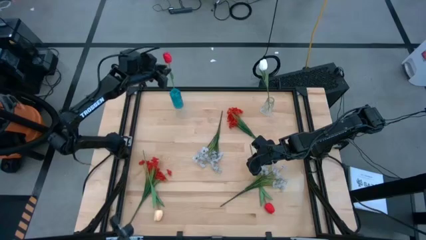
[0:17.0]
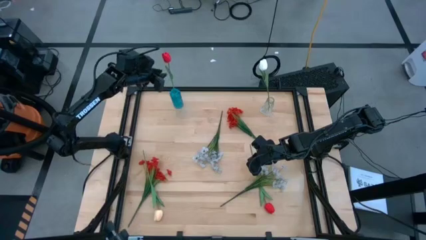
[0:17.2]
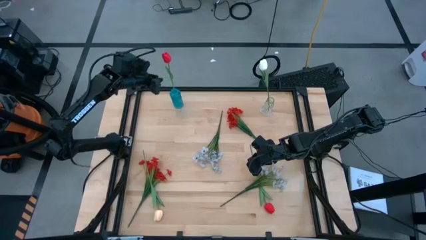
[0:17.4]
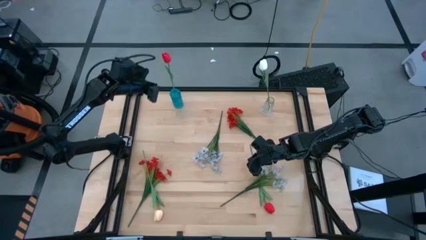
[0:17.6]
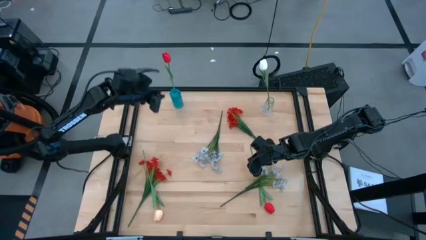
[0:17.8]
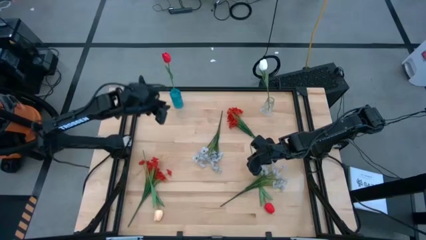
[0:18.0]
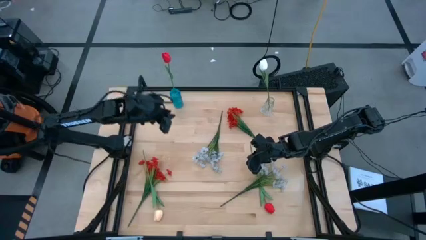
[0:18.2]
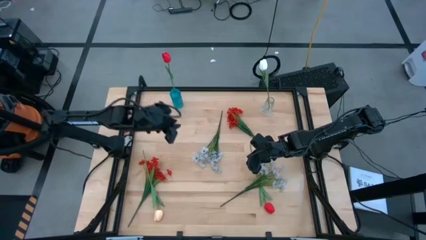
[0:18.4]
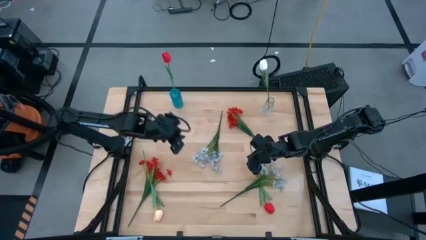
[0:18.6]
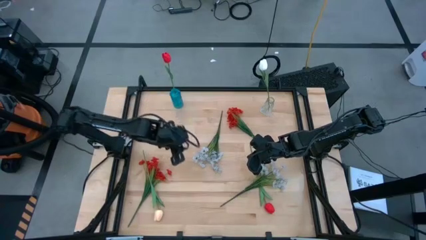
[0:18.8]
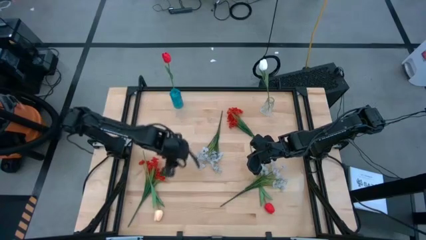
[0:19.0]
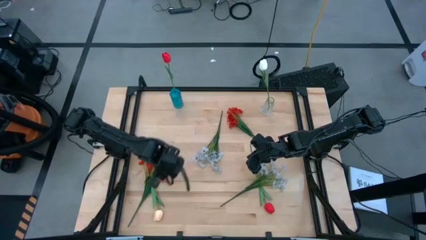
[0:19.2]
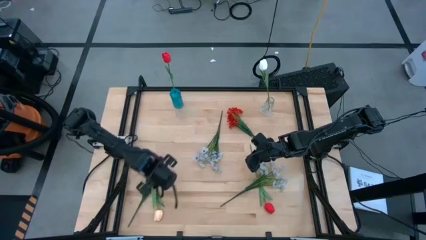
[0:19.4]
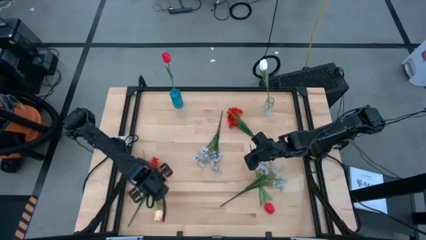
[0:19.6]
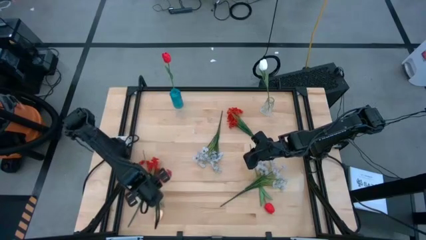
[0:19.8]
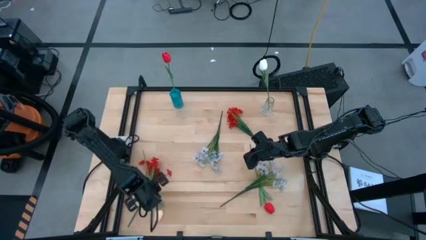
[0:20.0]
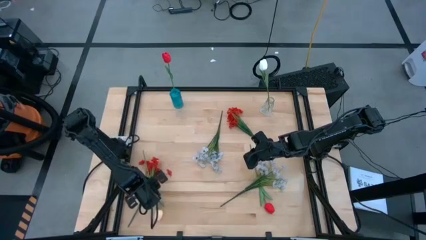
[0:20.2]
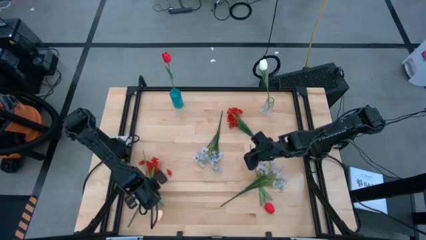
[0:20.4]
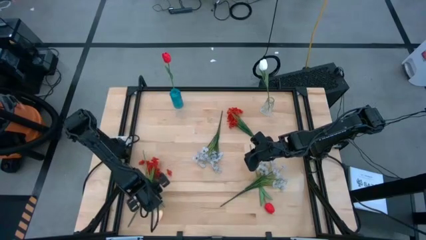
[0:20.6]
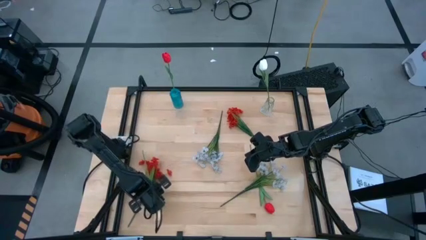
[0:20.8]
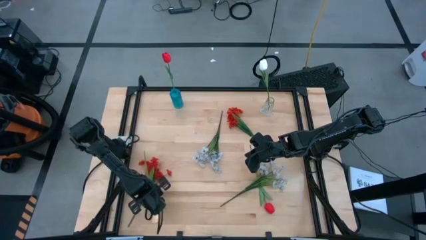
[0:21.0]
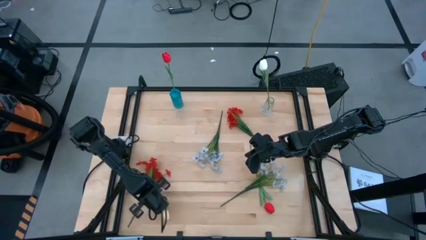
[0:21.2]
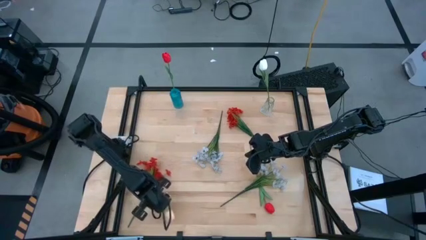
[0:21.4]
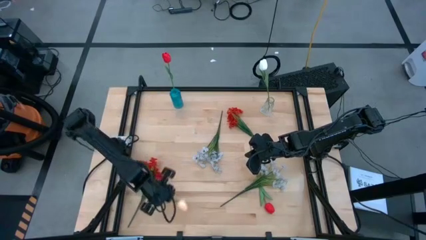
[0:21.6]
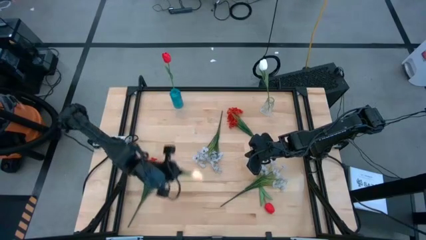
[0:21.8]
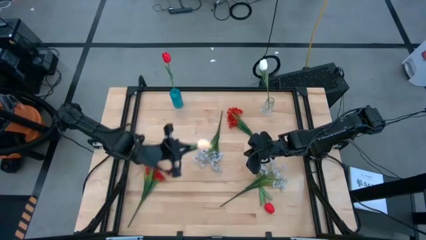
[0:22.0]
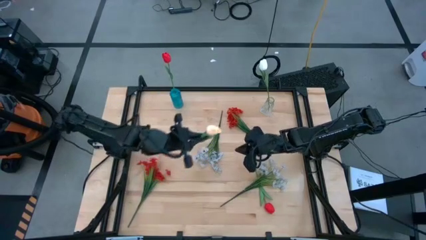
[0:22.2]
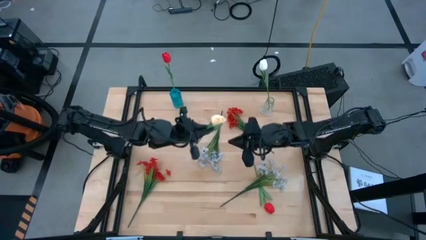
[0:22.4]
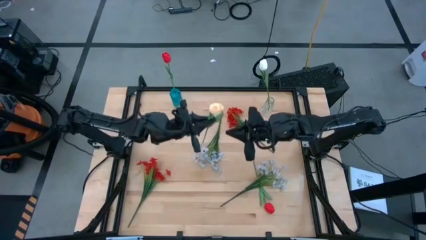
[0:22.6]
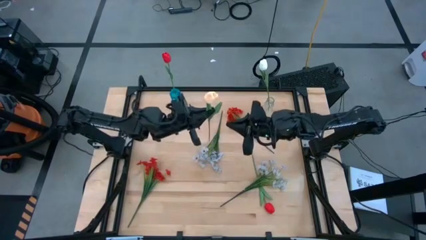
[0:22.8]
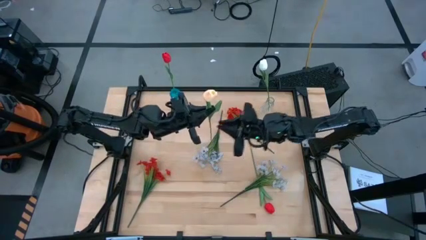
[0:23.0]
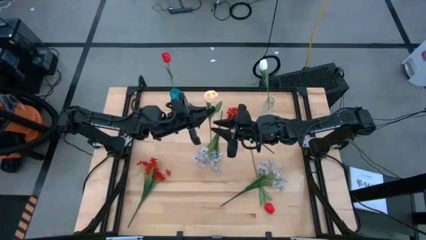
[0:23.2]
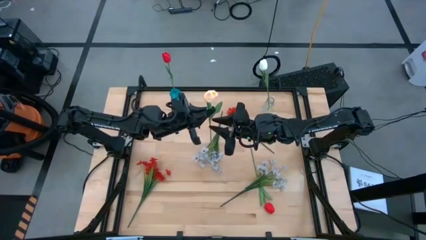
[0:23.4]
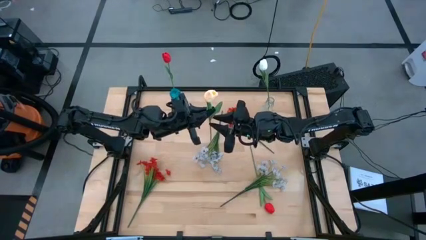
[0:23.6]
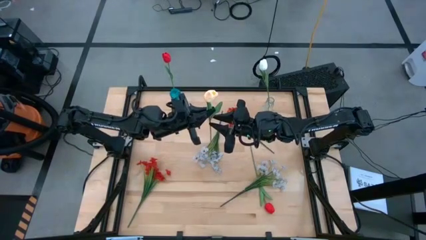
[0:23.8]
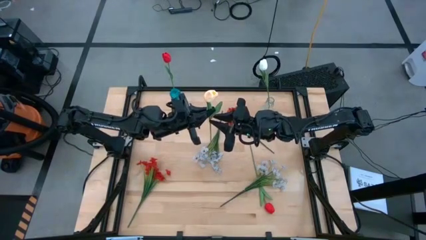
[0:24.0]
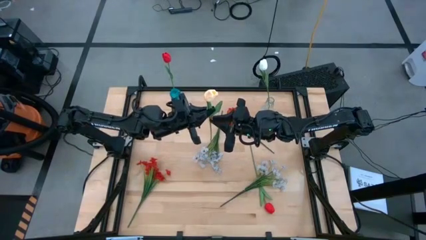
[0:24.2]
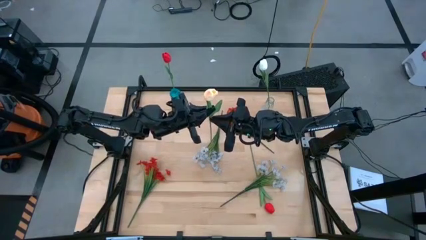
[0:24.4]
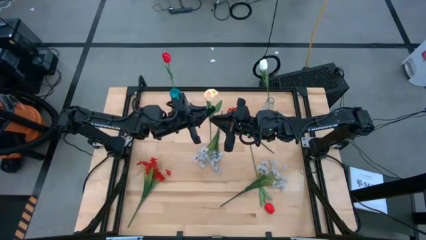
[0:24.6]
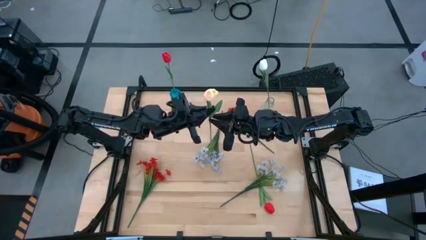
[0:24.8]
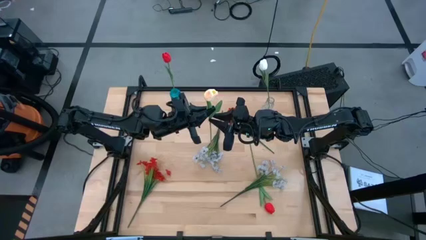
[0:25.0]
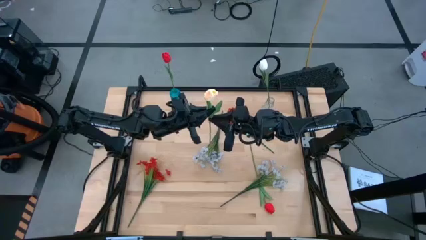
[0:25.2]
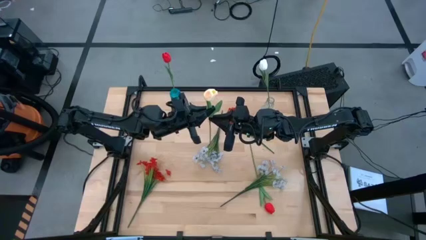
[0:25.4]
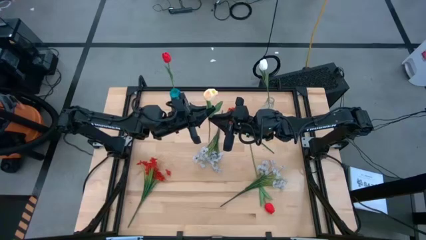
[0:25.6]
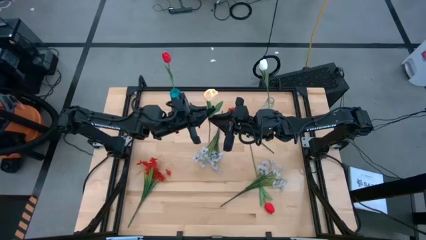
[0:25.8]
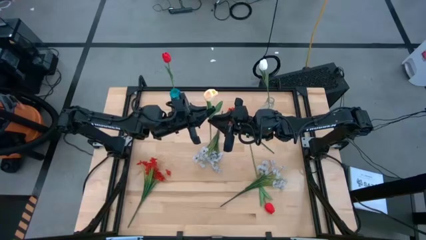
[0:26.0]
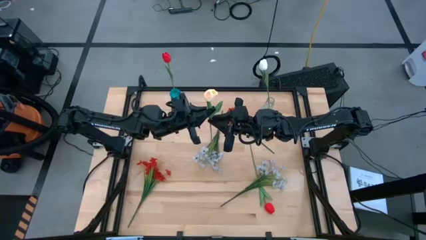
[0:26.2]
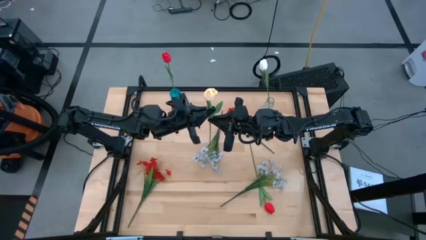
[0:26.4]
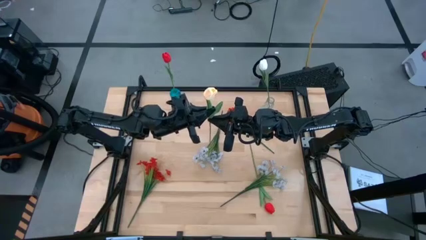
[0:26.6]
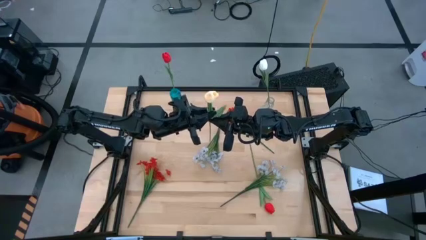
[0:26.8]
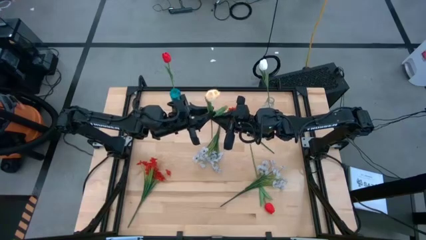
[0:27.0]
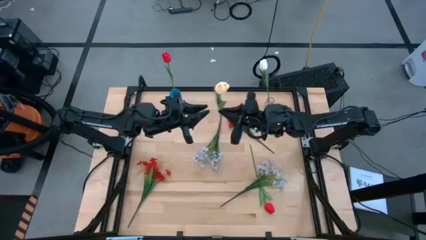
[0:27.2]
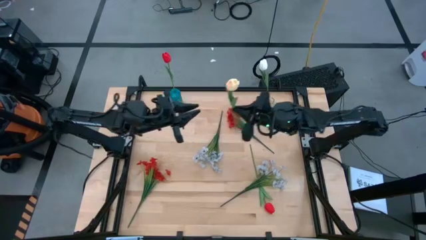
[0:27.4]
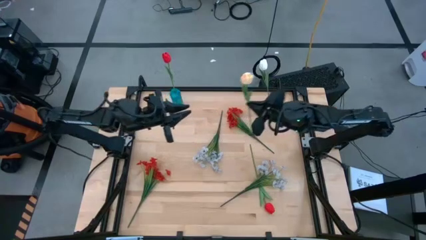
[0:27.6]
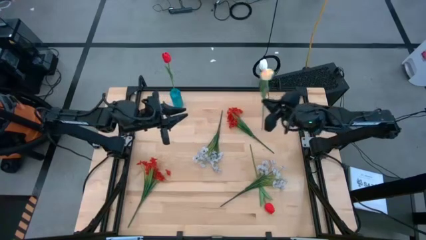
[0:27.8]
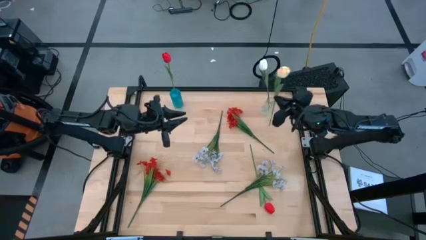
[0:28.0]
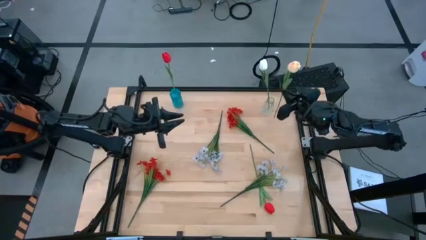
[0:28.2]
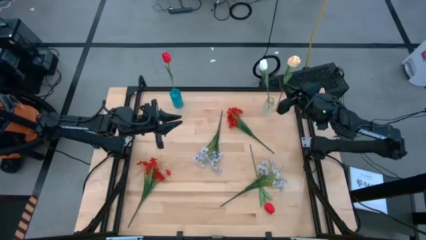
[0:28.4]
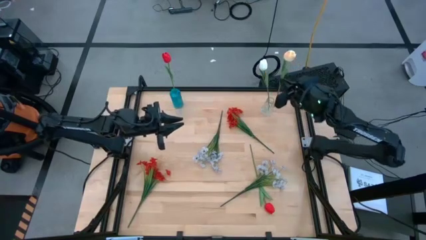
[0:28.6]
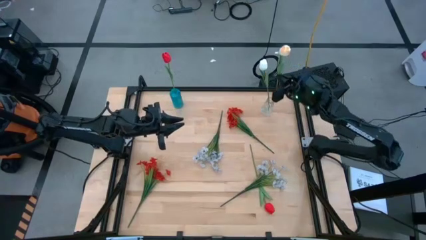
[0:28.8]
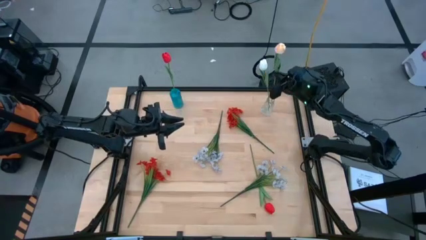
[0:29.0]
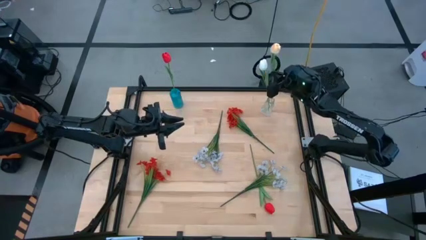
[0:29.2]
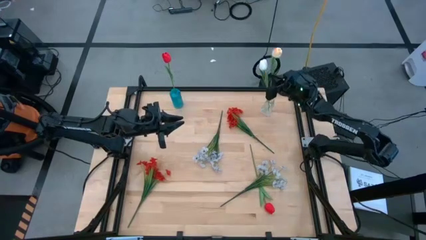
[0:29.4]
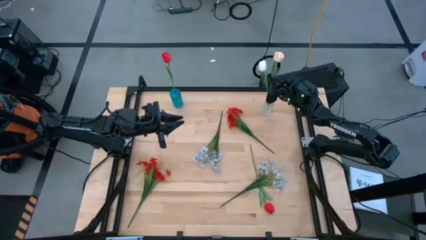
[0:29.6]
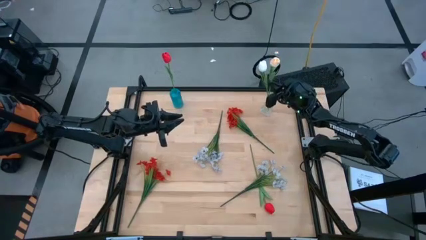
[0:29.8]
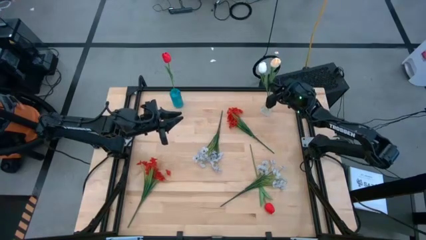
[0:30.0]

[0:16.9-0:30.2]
Task: Sort flowers into vase by color
Put the yellow flower into the transparent vase
